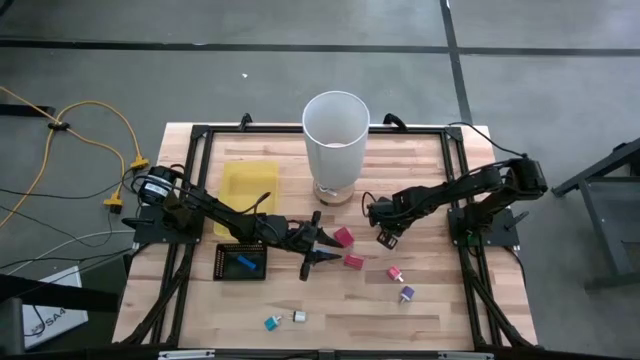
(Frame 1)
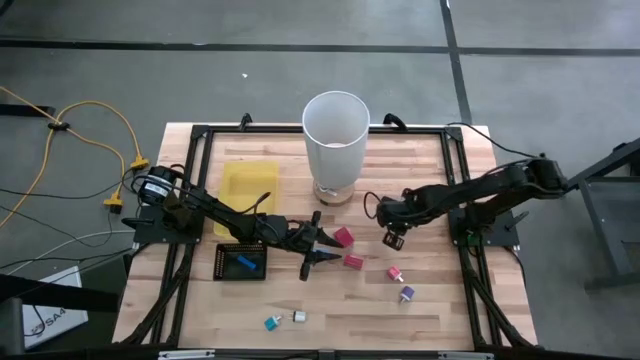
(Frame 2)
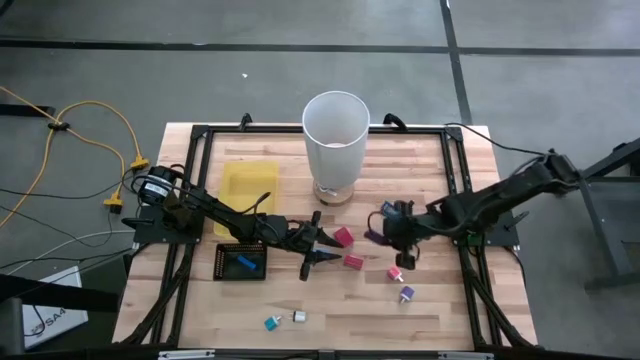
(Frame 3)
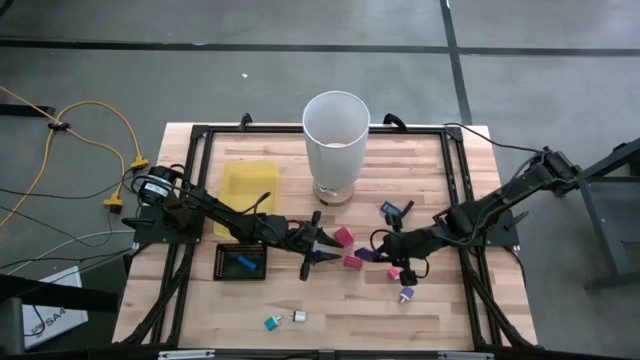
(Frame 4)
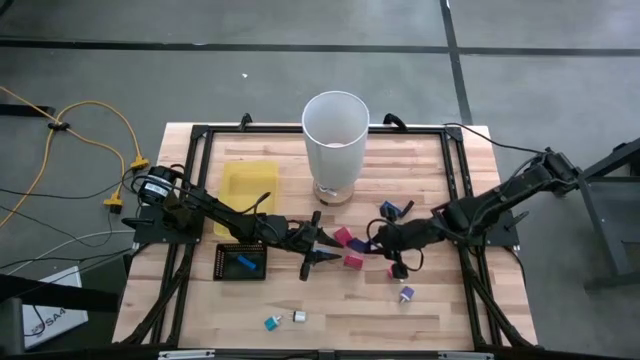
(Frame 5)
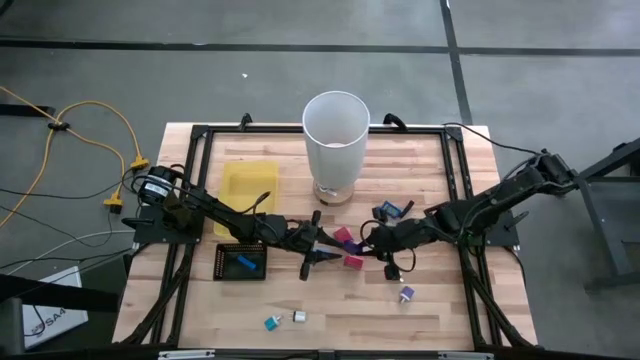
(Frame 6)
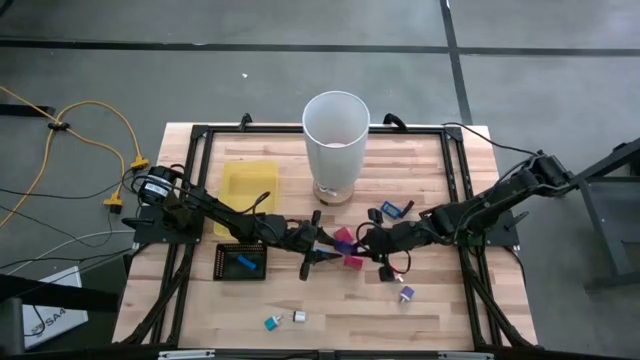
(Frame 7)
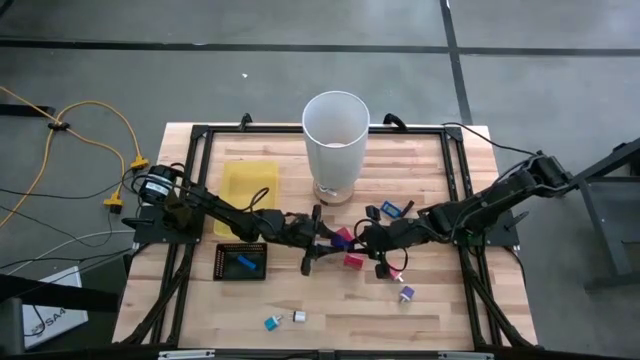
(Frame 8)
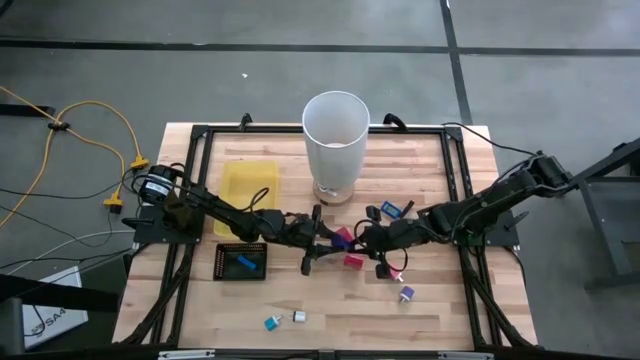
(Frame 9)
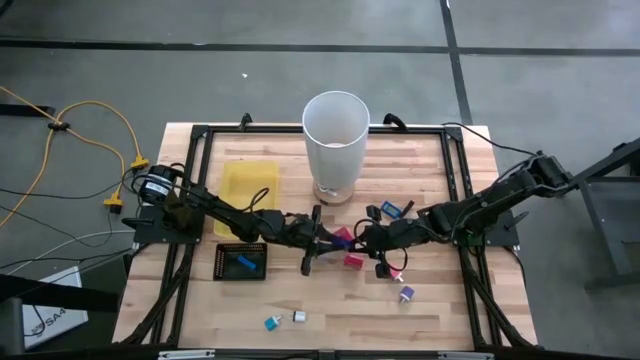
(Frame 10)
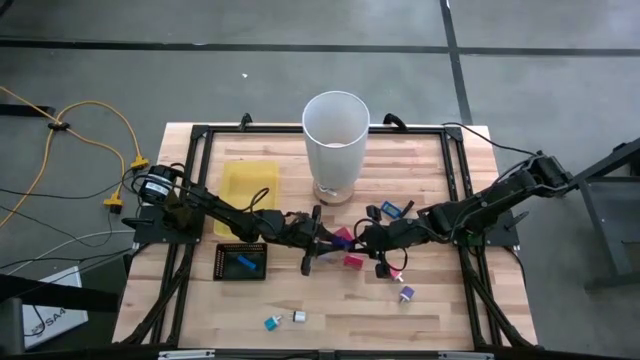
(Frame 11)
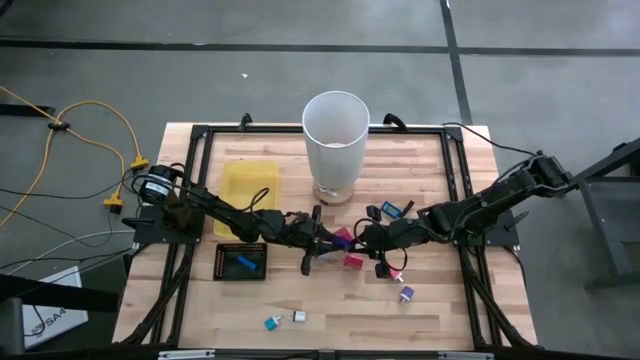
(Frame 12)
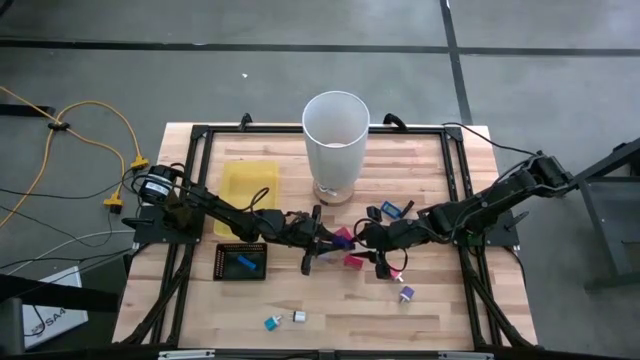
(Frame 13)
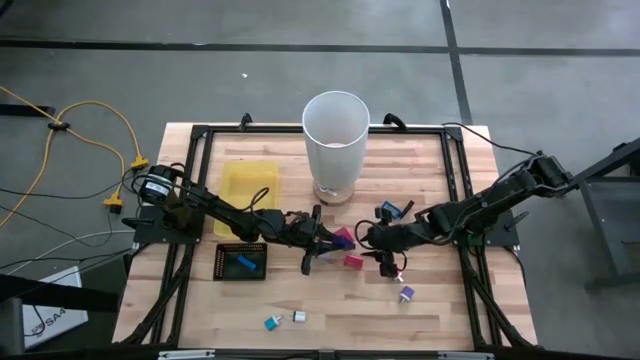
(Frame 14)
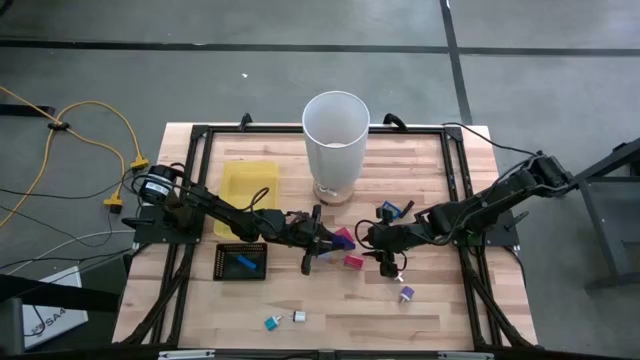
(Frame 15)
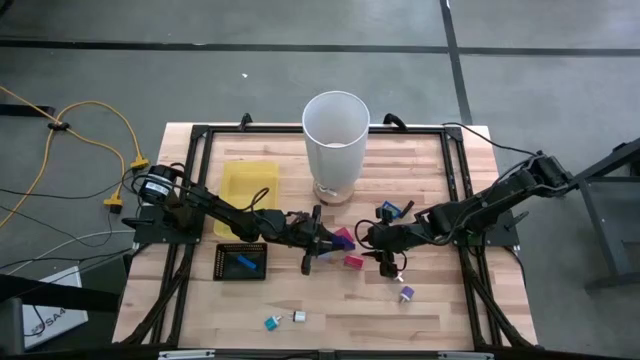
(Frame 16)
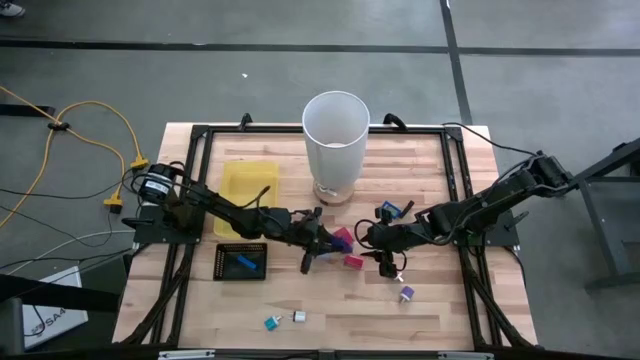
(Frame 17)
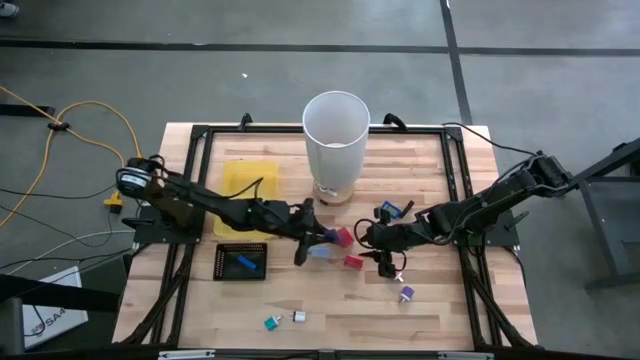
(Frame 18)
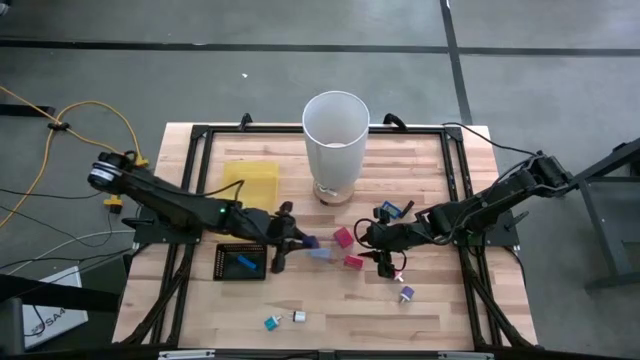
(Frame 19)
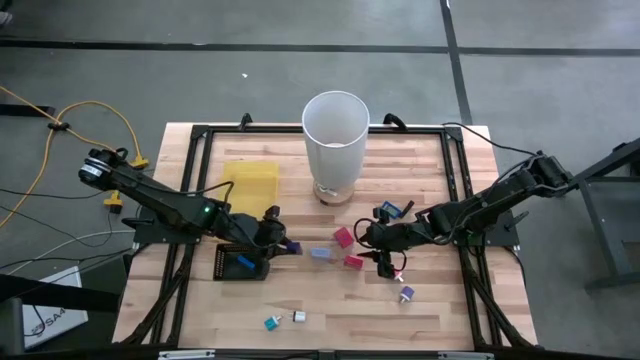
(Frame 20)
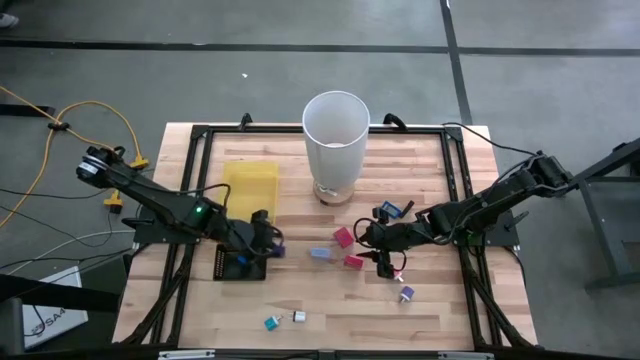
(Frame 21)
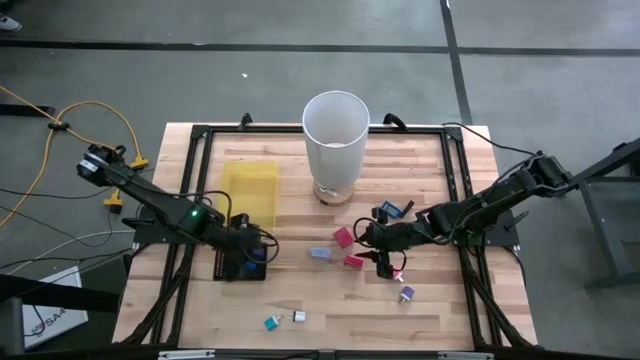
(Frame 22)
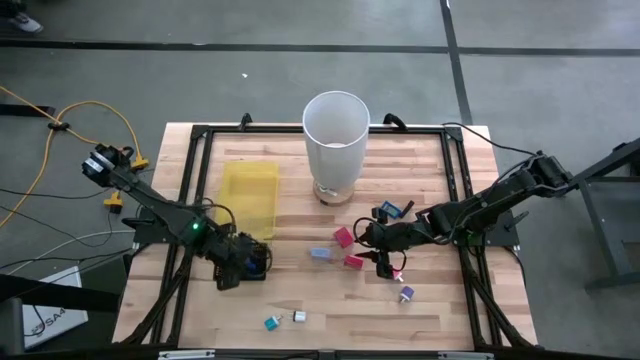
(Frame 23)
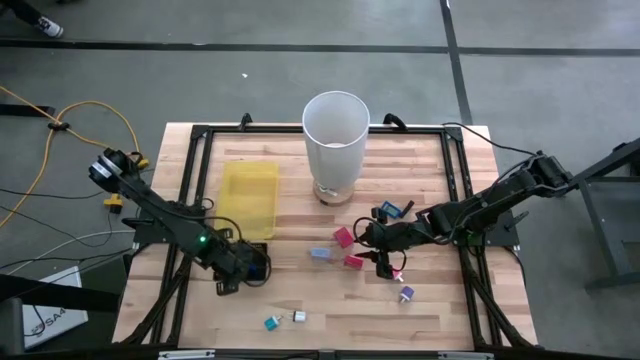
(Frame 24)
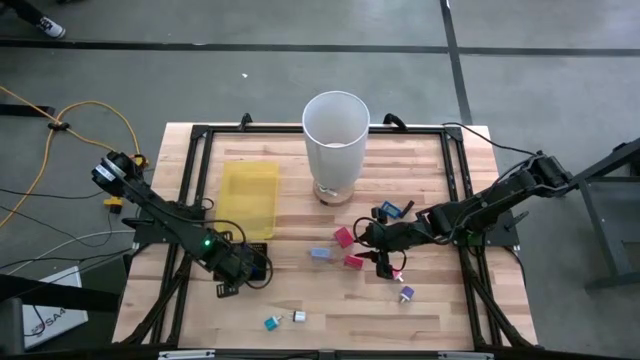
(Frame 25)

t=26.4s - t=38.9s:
Task: Pick & Place Office items
Put the violet digital clock into the black bin

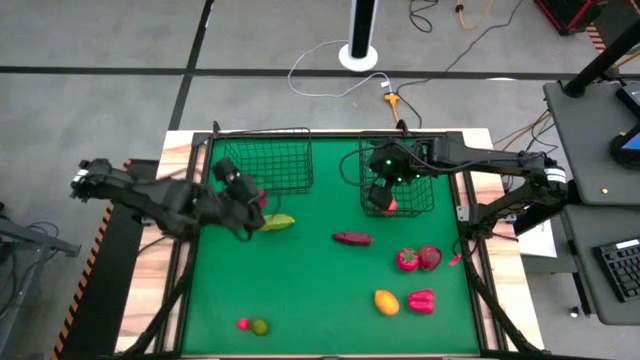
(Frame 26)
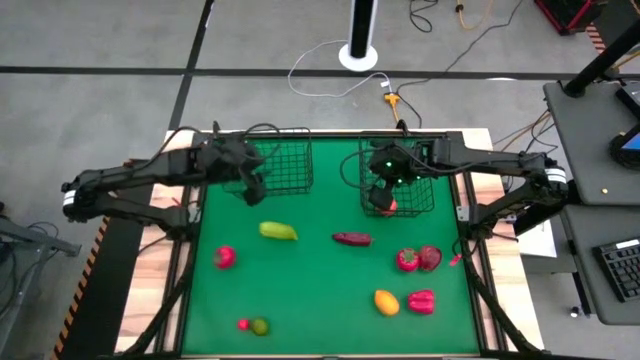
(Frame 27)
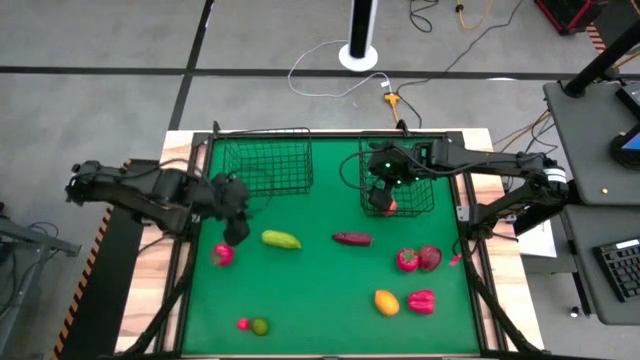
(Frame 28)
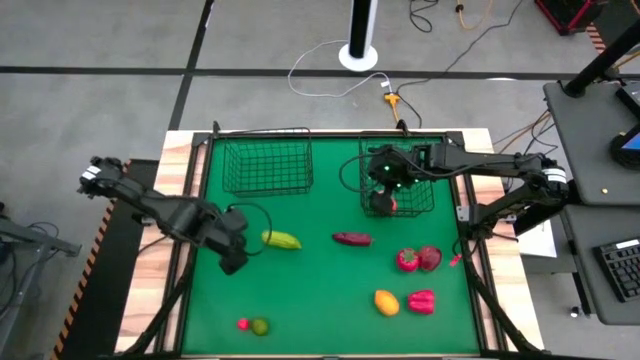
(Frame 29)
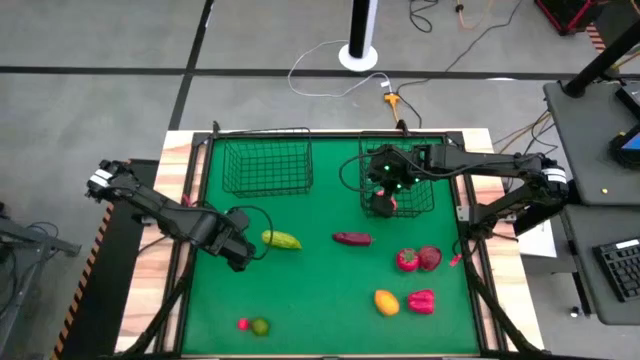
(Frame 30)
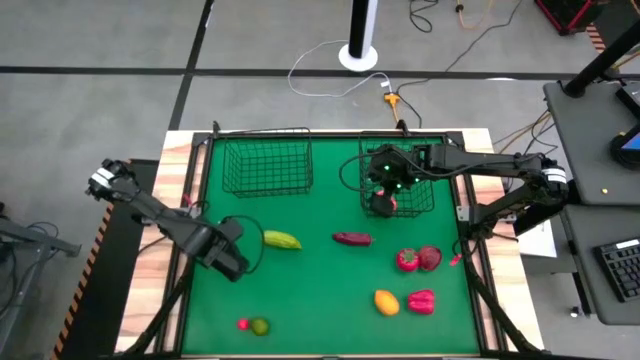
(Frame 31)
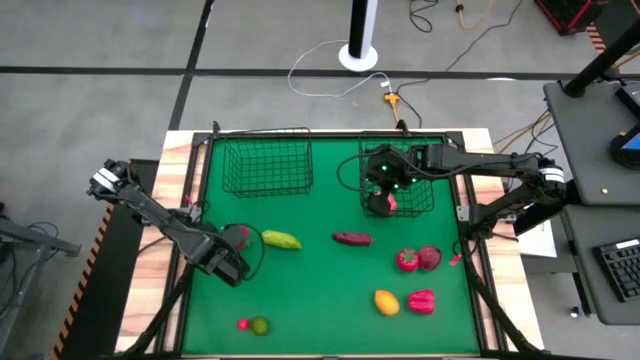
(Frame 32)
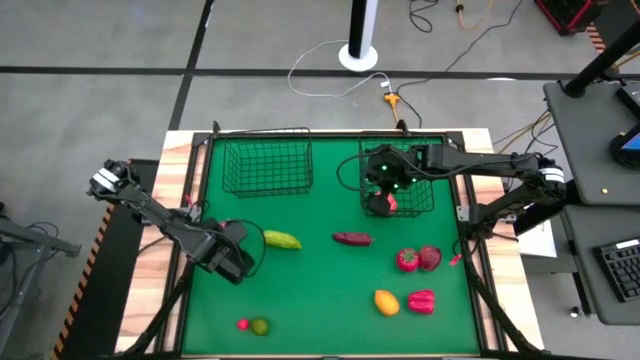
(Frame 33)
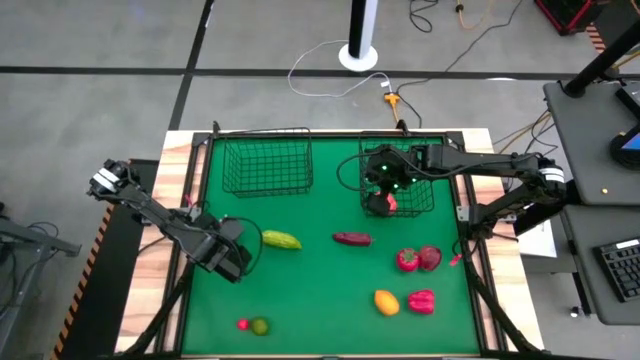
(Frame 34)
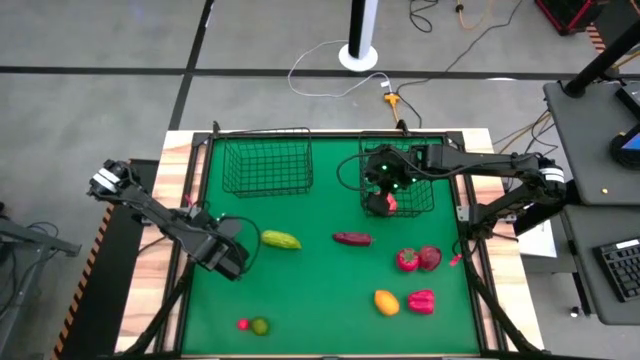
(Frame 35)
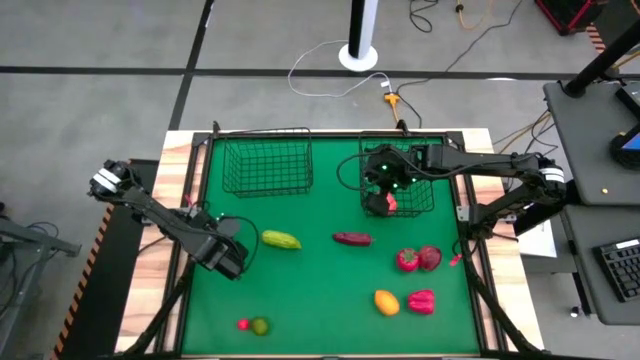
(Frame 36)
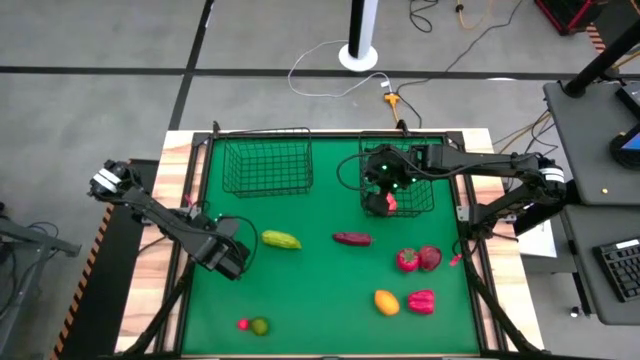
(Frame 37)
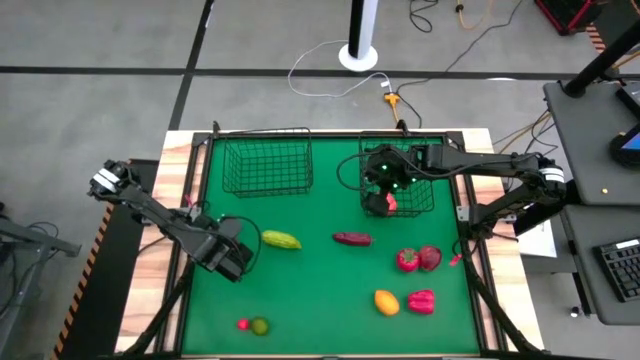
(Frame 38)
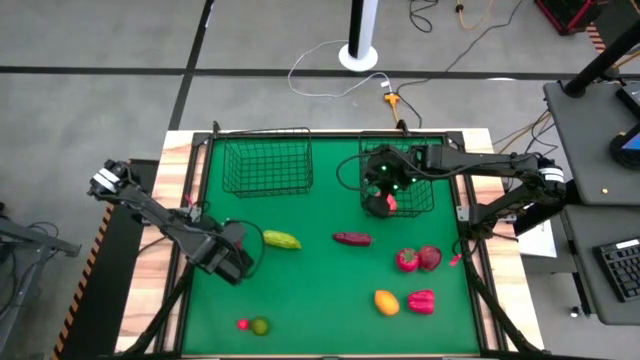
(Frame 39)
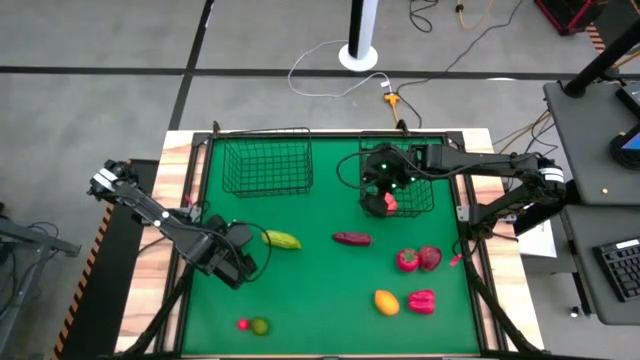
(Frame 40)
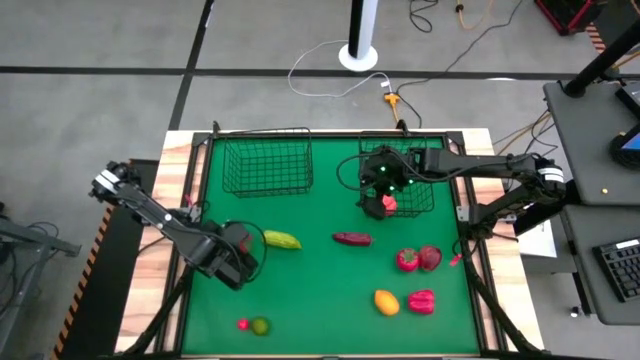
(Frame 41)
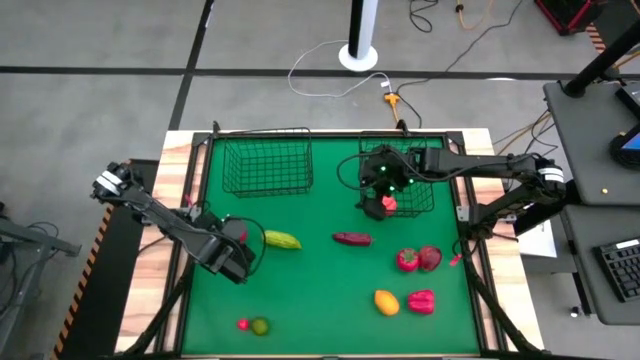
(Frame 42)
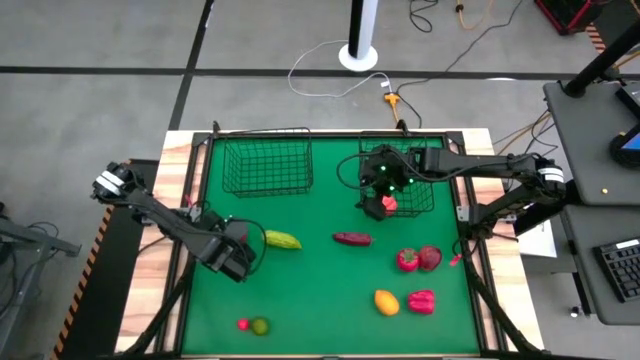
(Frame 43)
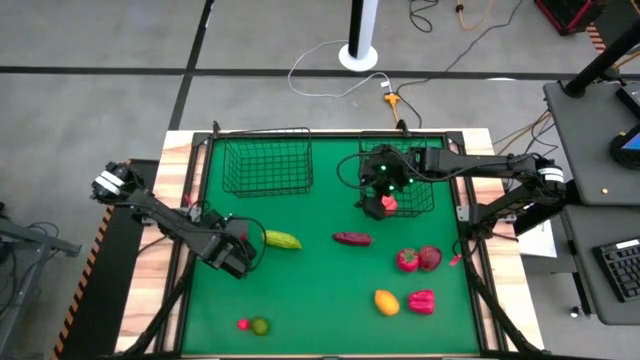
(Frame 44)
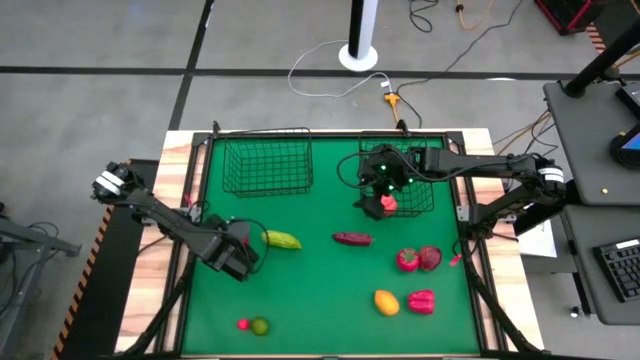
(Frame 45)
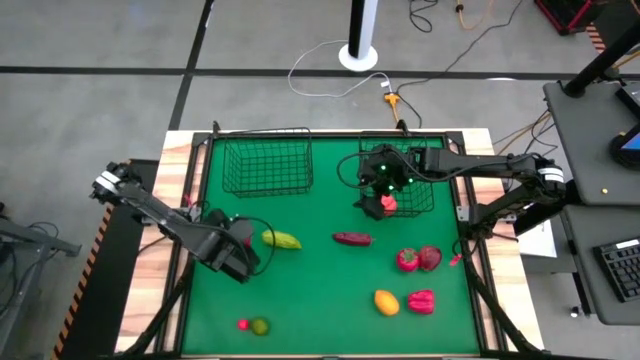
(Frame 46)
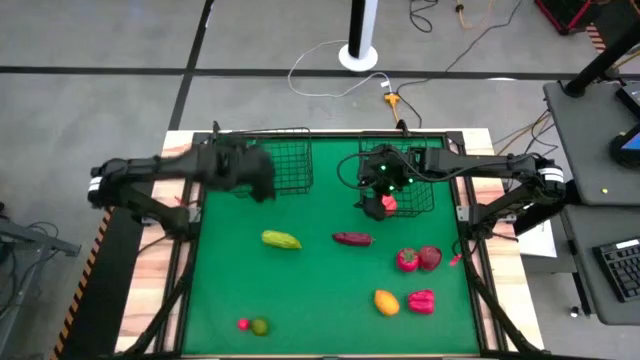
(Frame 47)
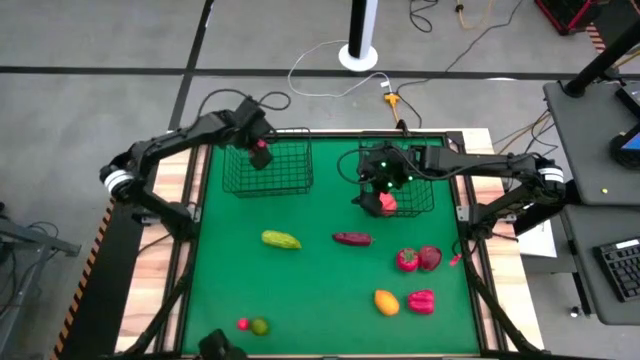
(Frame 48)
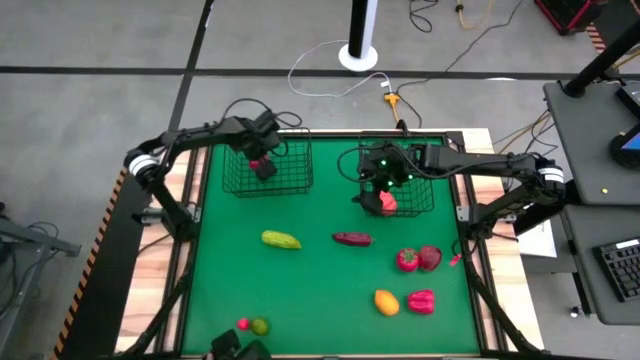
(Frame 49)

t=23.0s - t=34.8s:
Task: Sort produce into baskets
Put the left red tomato into the left wire basket
